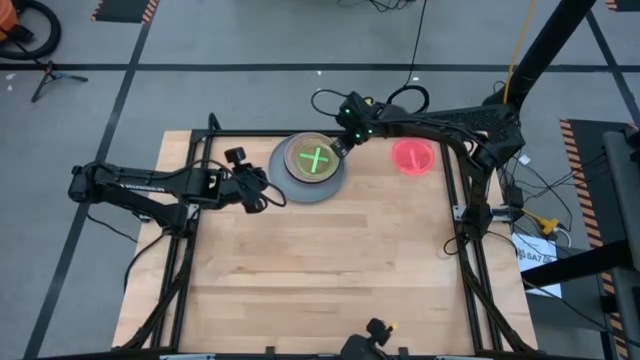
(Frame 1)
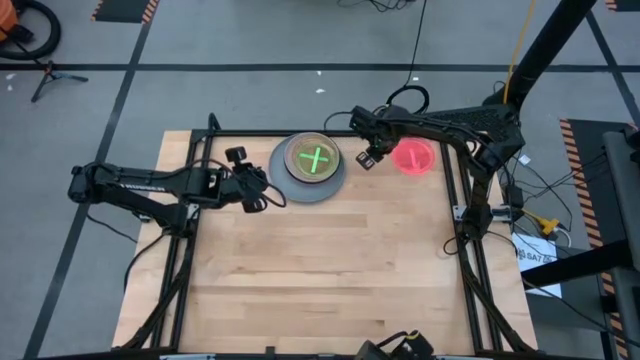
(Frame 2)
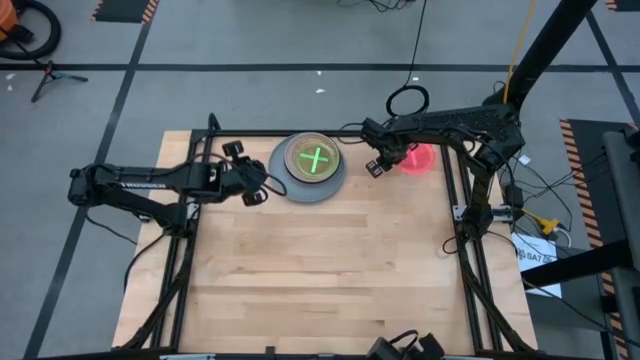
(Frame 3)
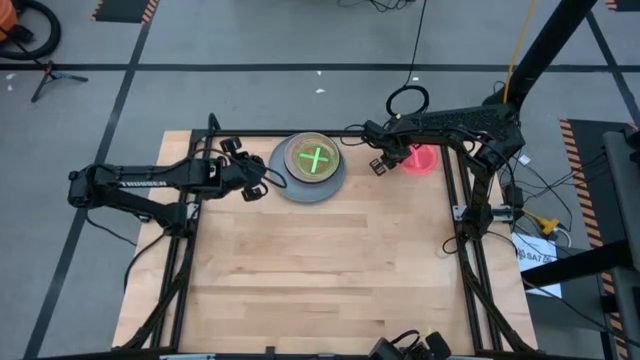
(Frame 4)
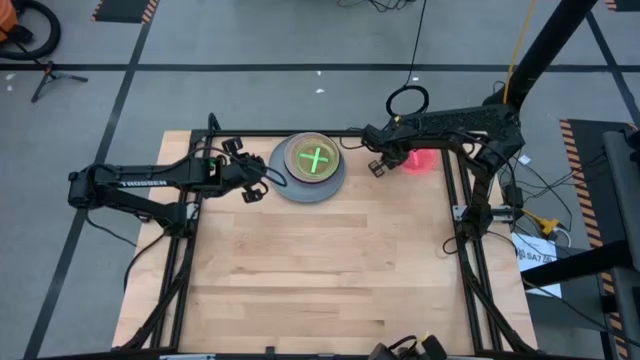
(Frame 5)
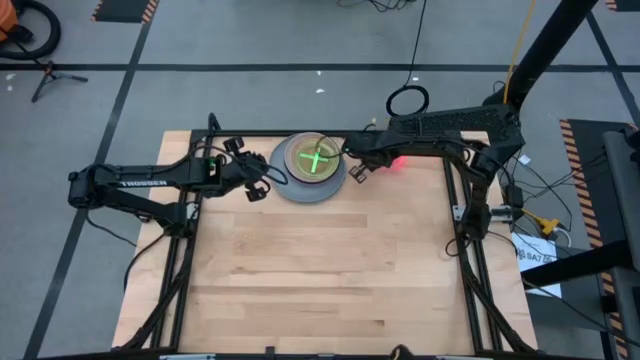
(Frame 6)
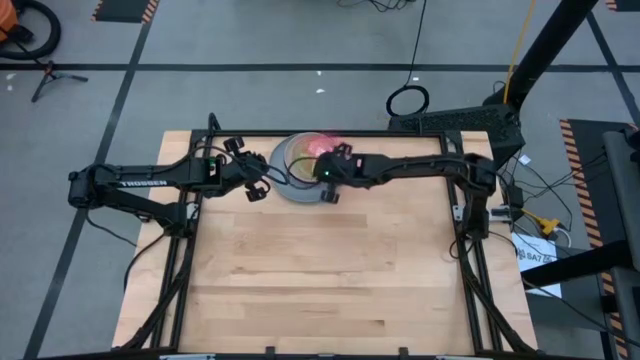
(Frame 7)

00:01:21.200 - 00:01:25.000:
Task: Stack plastic plates
Stack the pink plate on top of the green plate

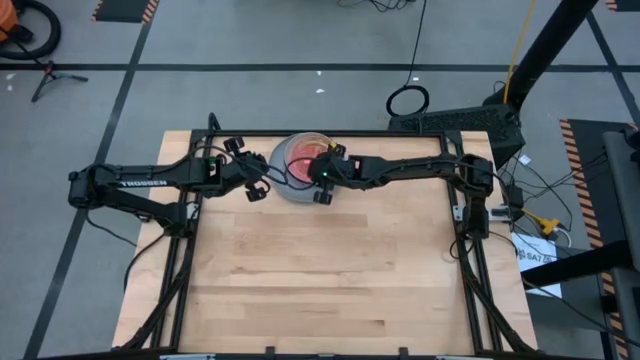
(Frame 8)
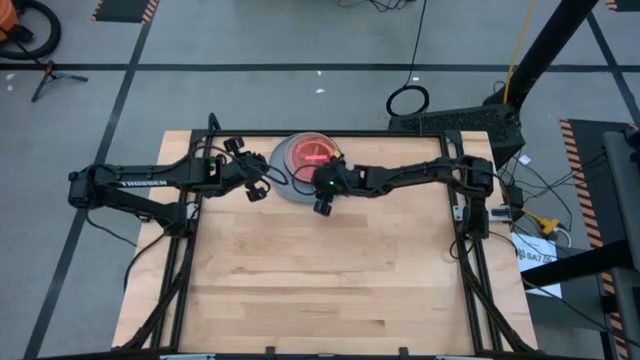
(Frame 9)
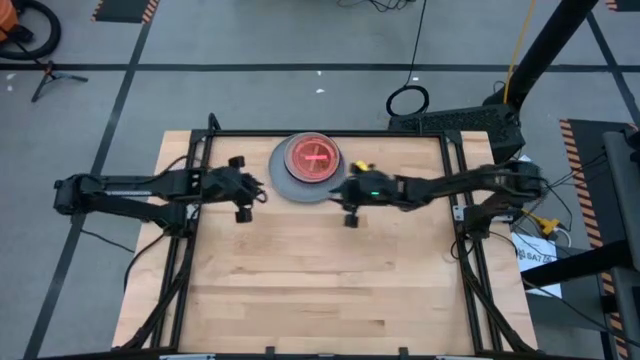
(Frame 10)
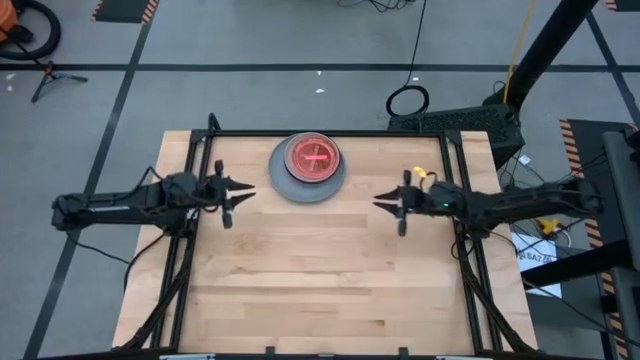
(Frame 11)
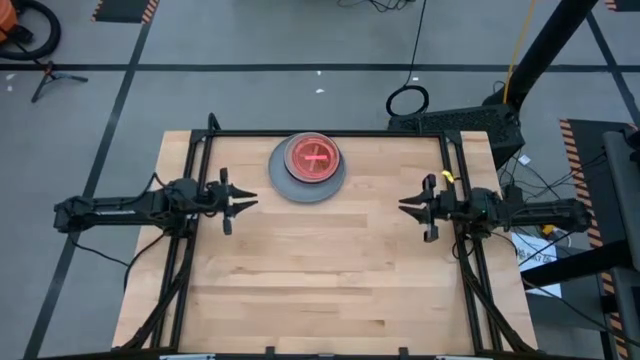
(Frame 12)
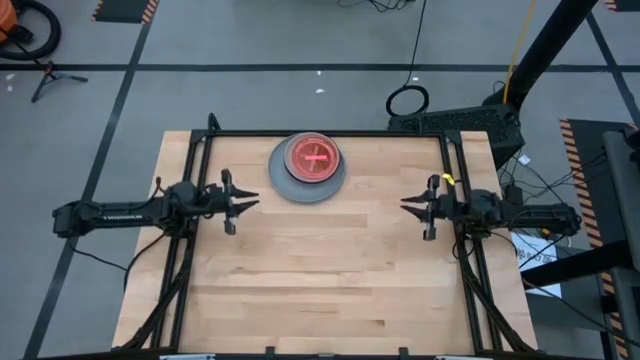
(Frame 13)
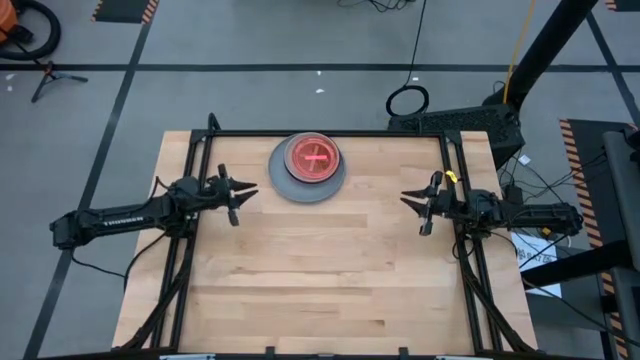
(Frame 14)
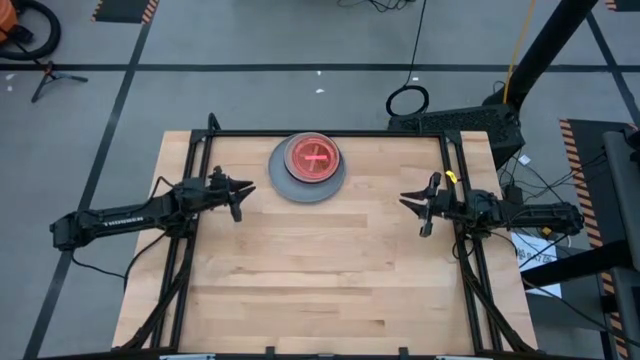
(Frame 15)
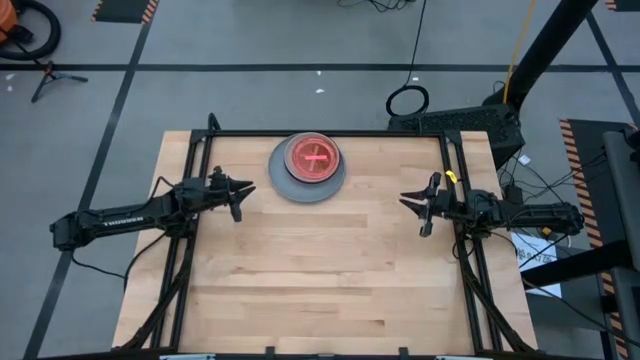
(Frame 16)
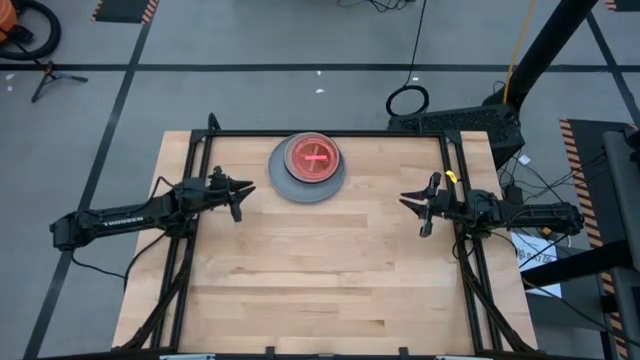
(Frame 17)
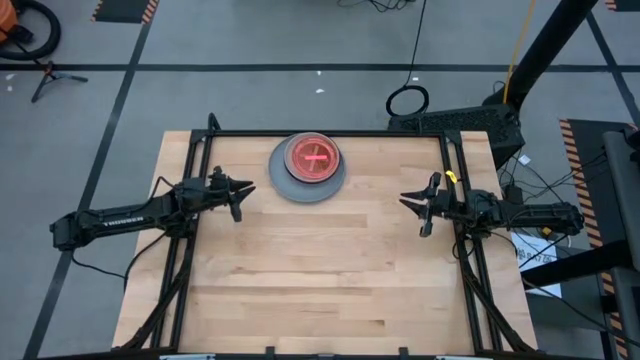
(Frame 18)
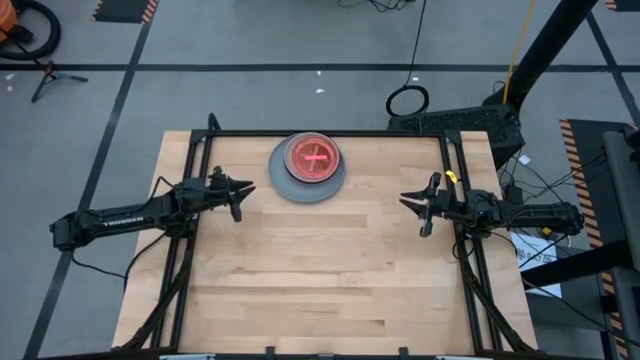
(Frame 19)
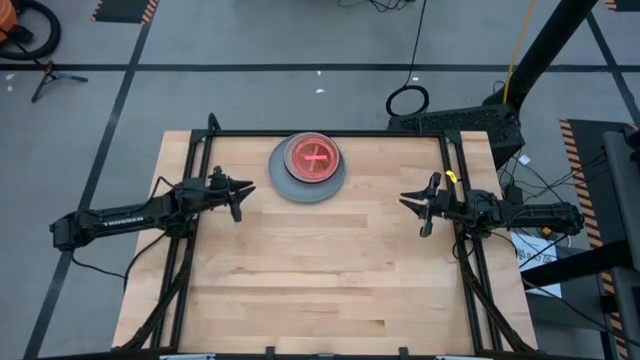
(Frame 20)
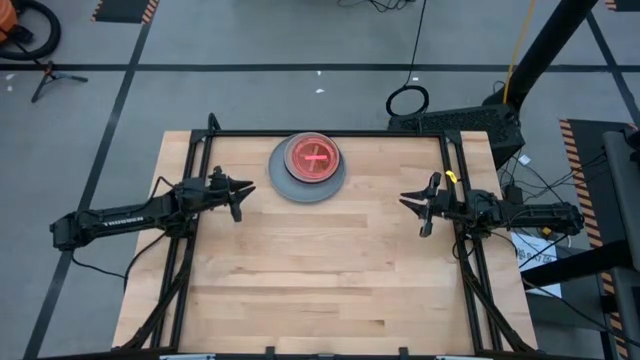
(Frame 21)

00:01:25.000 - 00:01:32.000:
Return to Home Position

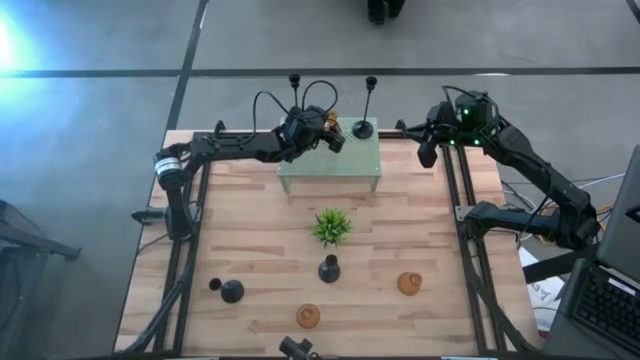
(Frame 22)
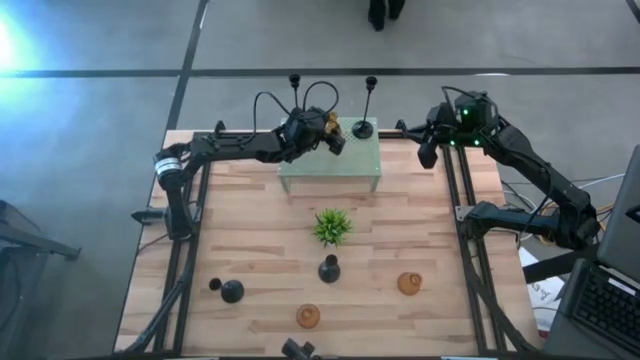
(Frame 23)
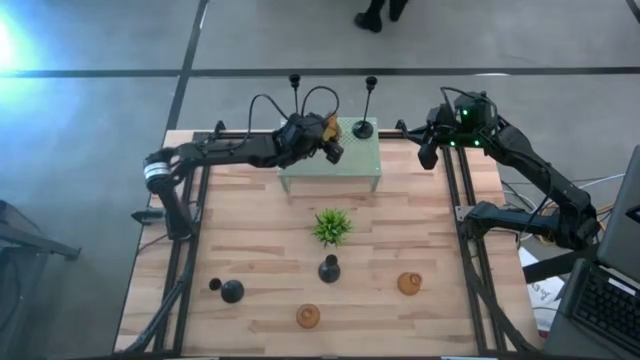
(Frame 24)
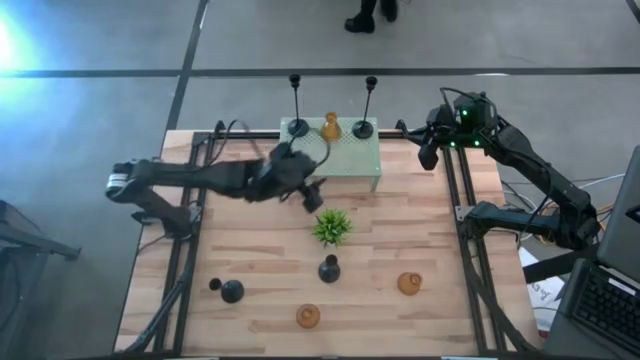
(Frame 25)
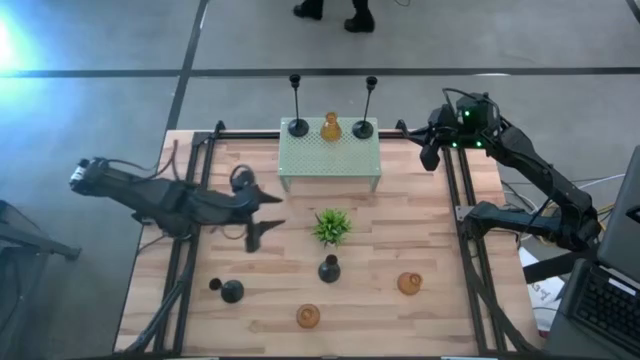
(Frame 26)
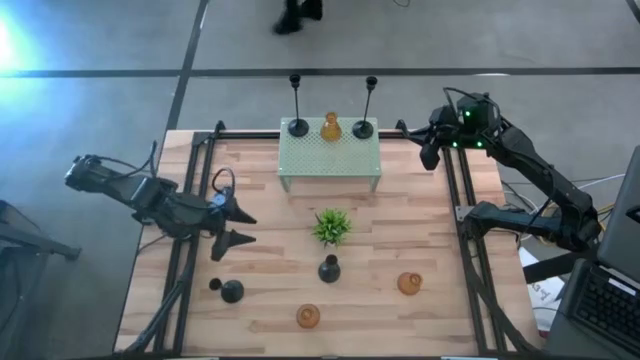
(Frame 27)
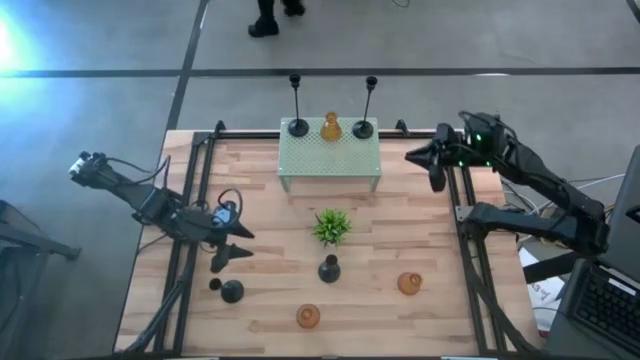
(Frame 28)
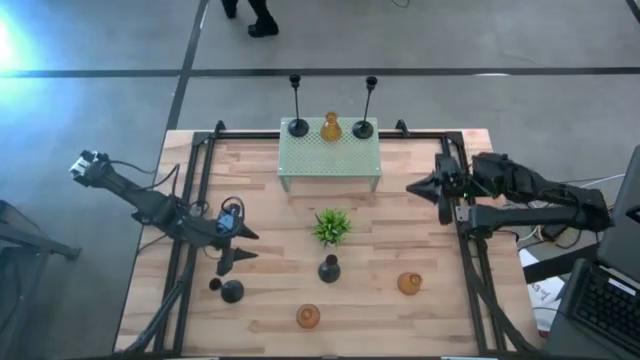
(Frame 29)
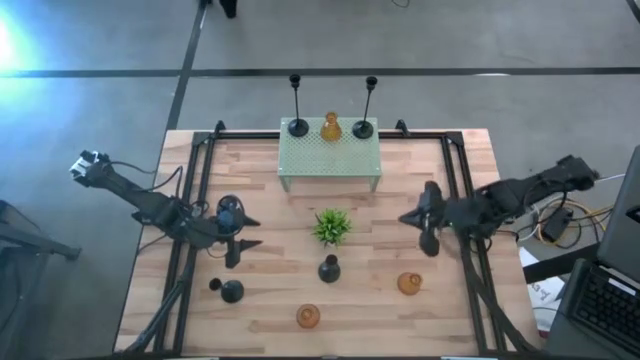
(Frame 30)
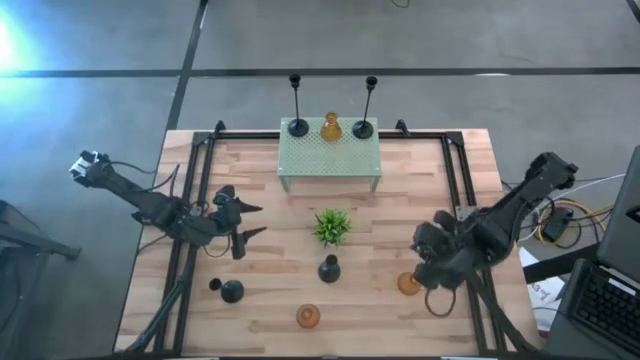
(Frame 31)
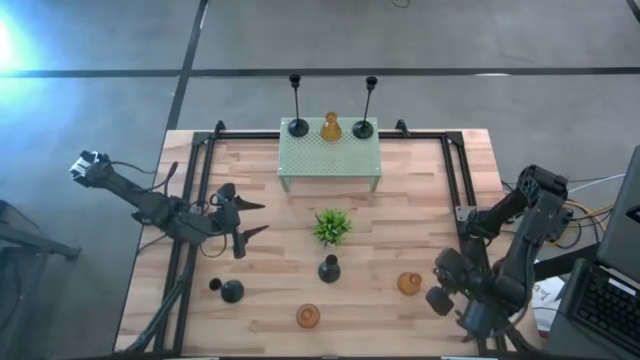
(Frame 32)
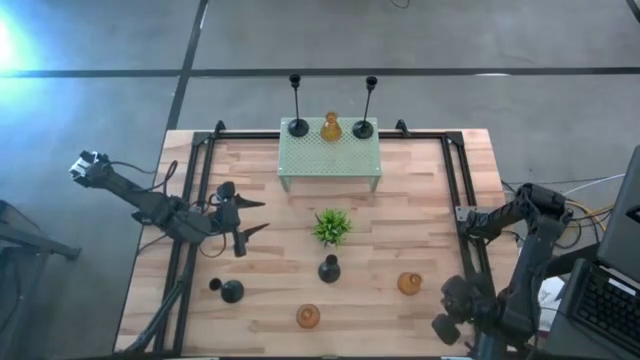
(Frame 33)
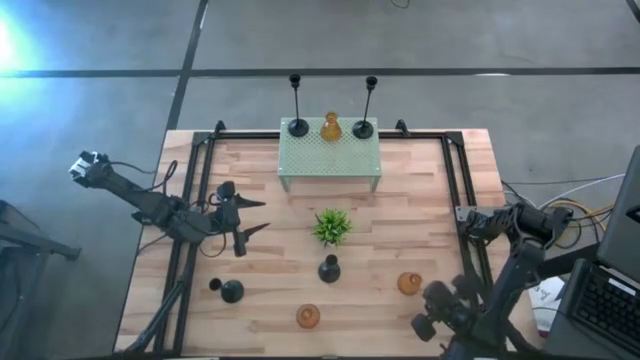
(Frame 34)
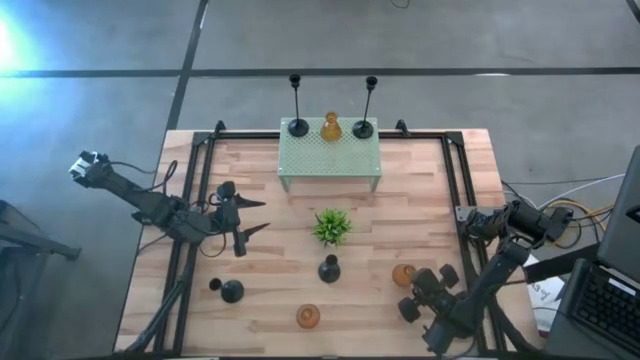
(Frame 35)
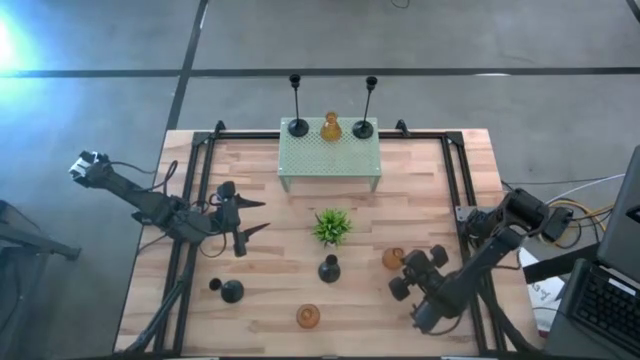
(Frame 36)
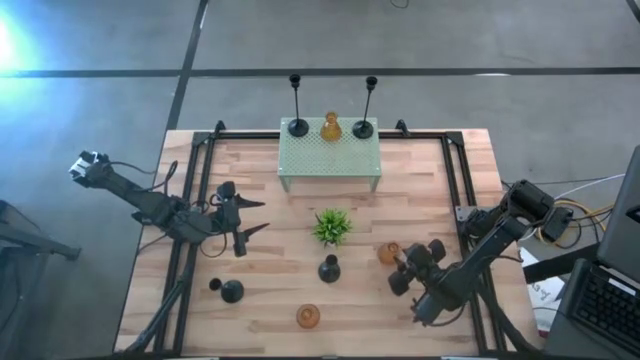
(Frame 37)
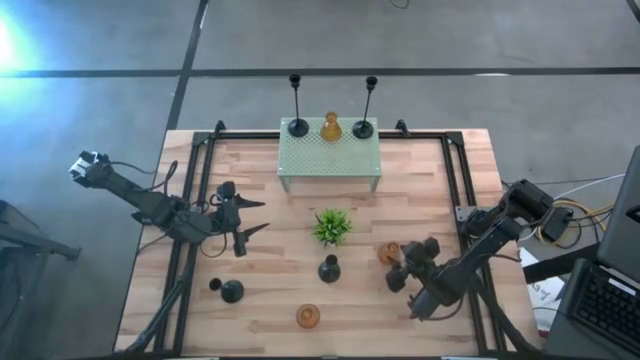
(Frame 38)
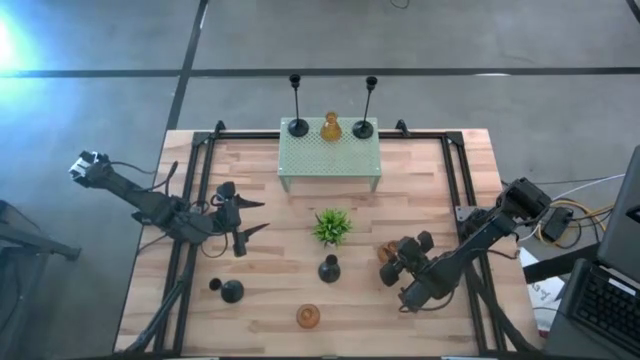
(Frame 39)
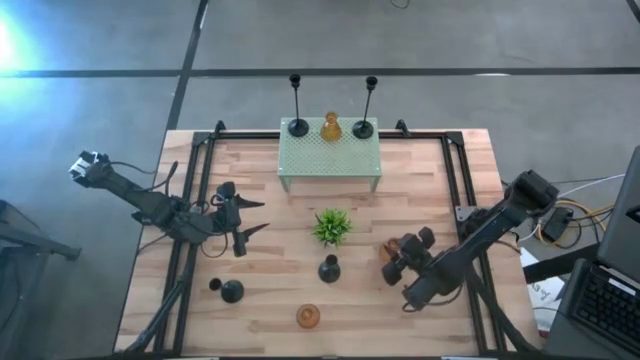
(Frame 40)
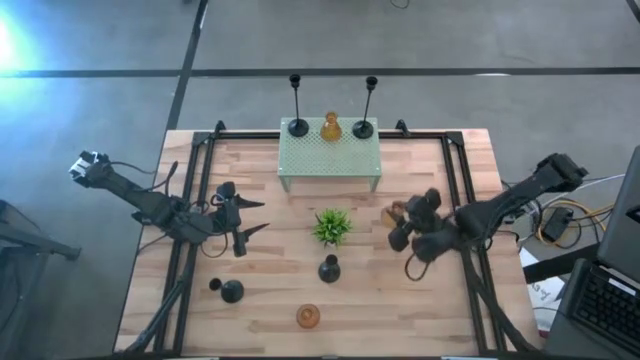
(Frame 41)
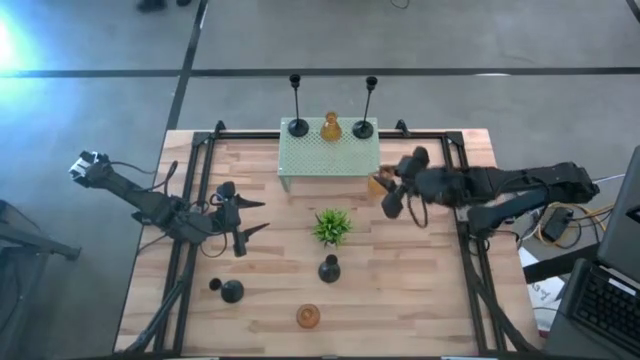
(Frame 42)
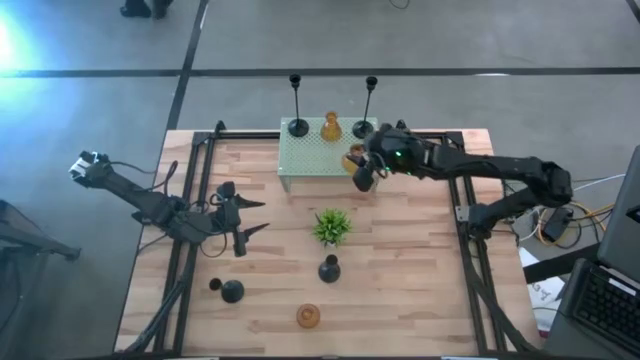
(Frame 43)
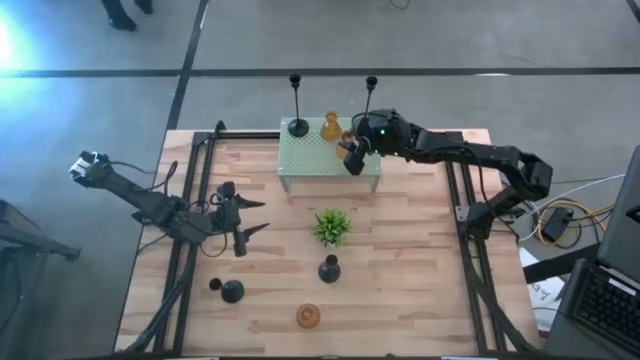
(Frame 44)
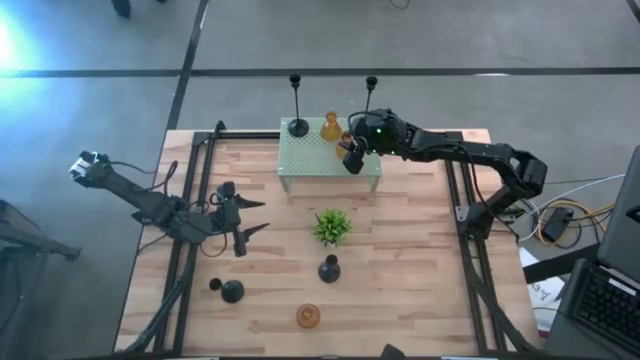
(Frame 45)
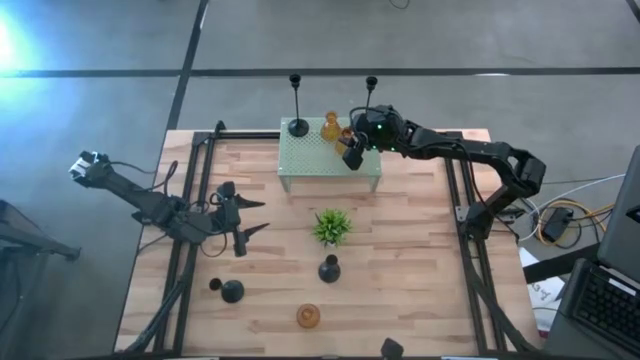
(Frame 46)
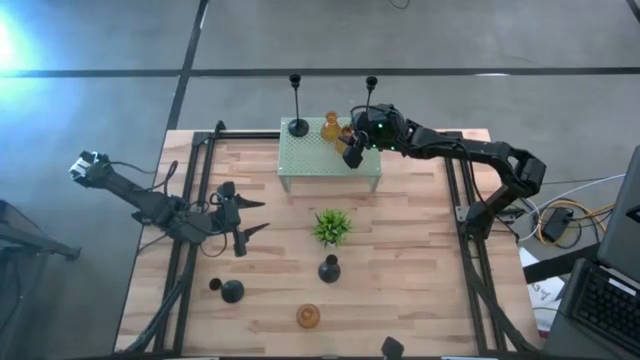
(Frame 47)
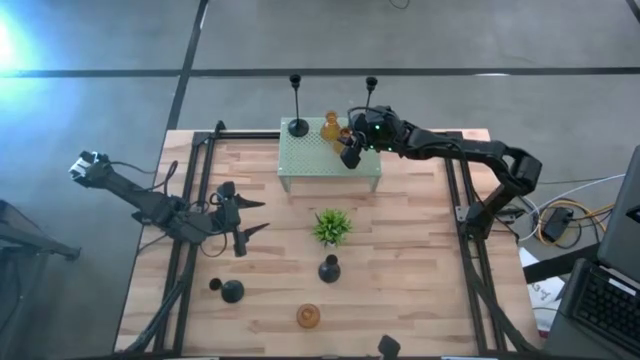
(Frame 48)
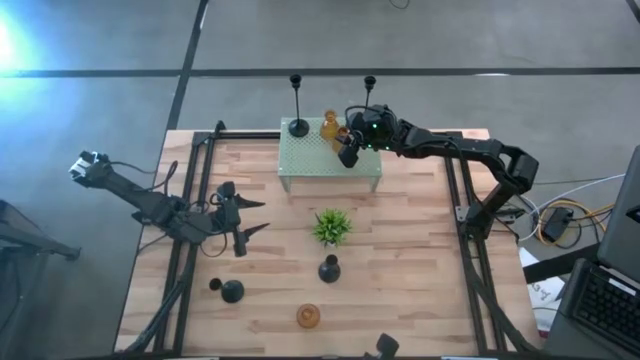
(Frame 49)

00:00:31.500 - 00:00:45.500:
Task: Pick & Place candle stick holders
Put the orange candle holder on the shelf
